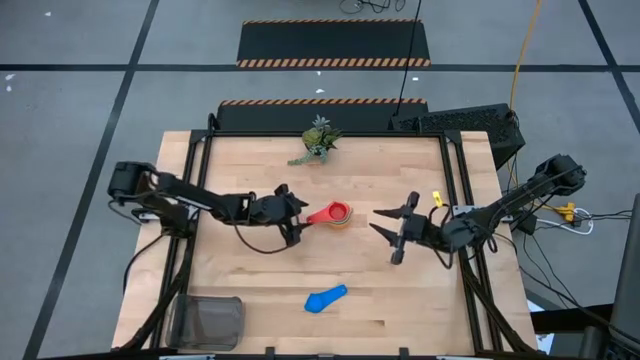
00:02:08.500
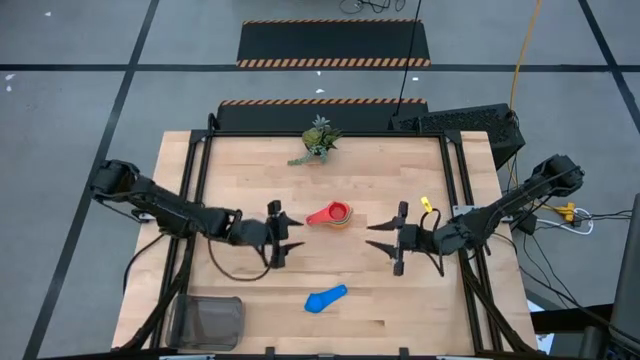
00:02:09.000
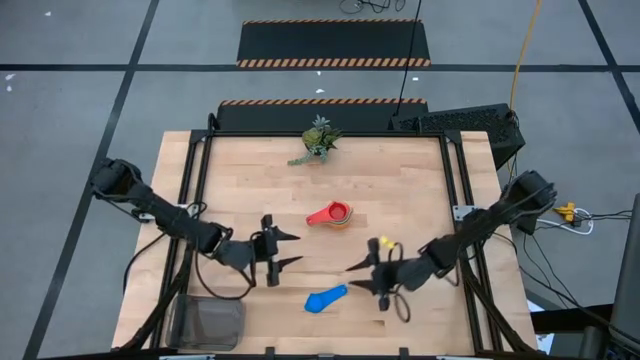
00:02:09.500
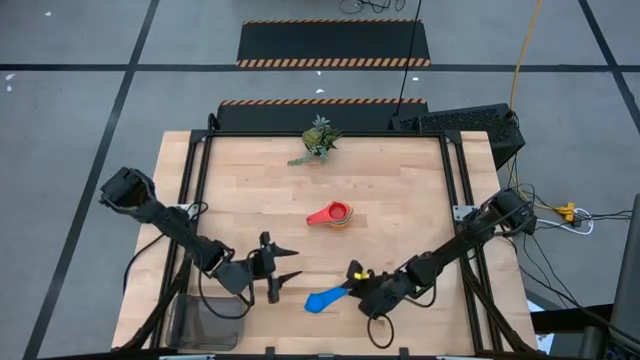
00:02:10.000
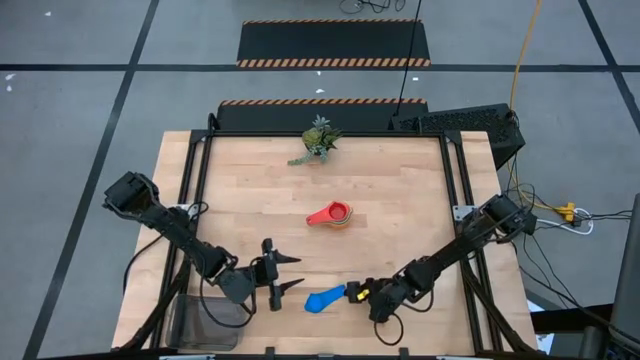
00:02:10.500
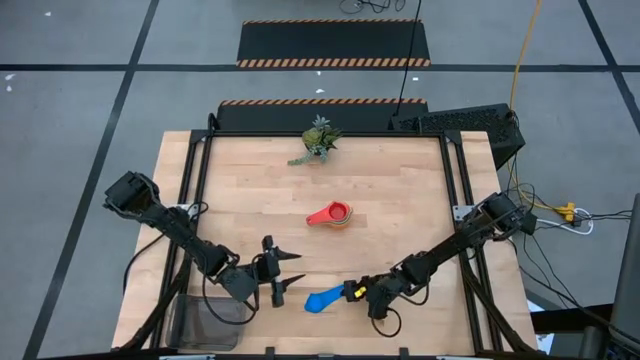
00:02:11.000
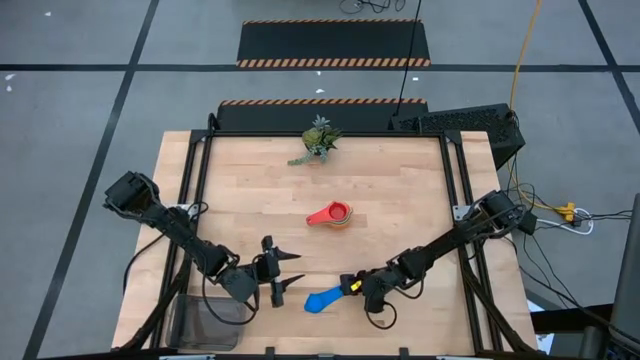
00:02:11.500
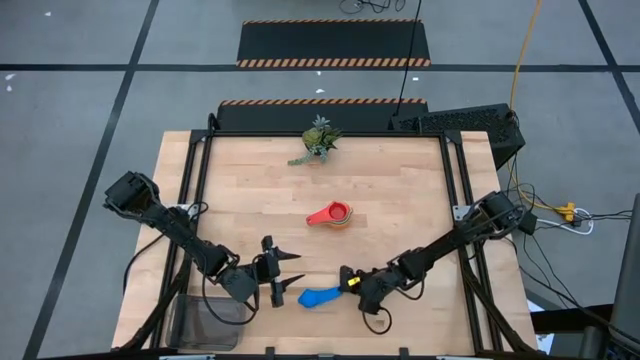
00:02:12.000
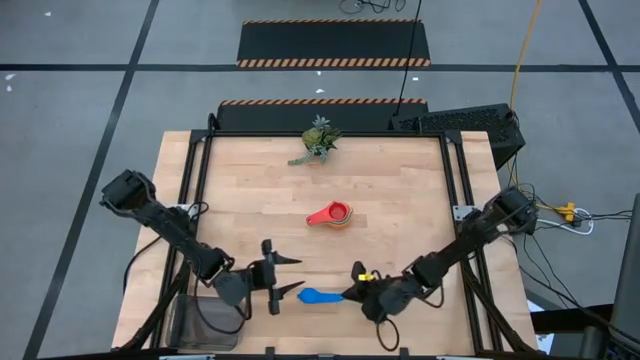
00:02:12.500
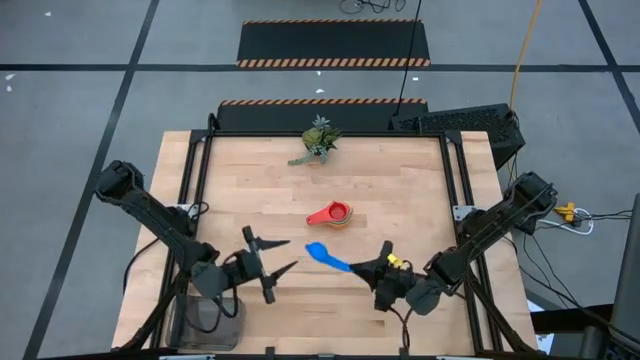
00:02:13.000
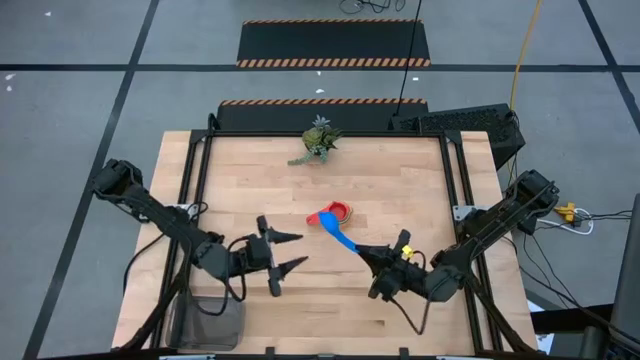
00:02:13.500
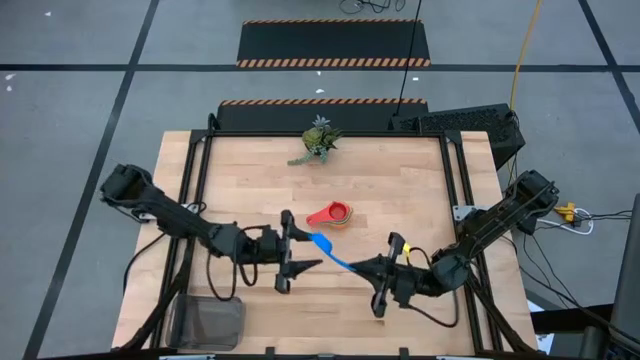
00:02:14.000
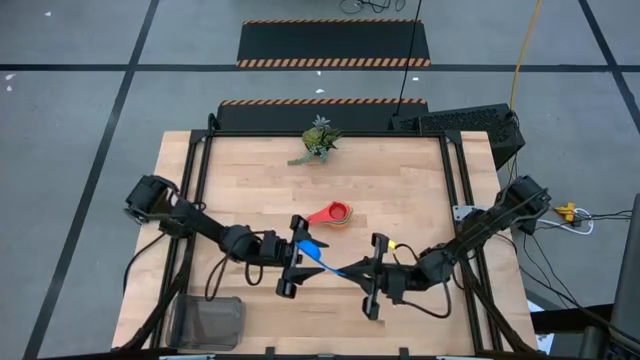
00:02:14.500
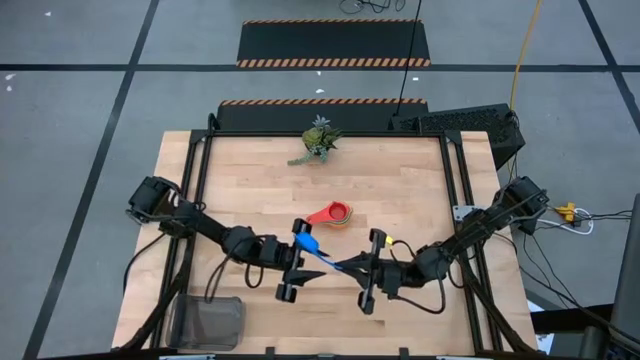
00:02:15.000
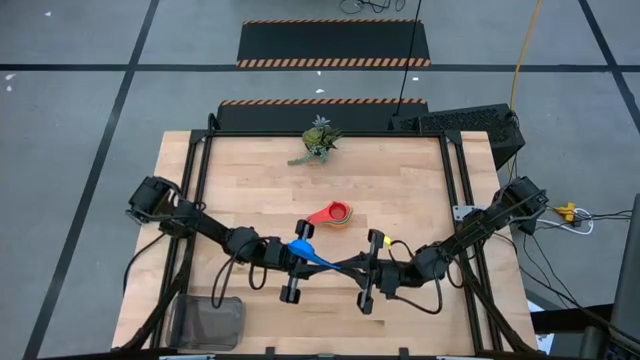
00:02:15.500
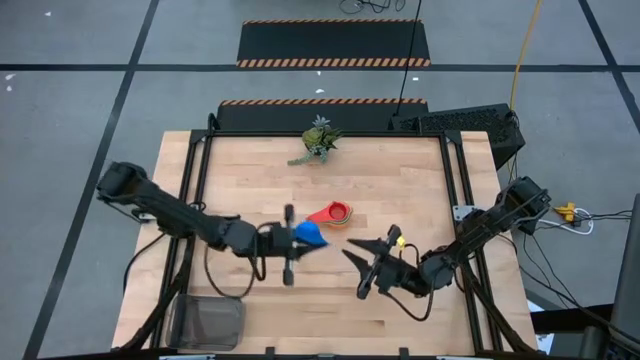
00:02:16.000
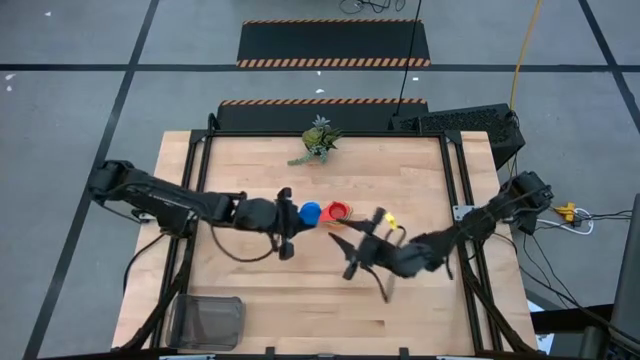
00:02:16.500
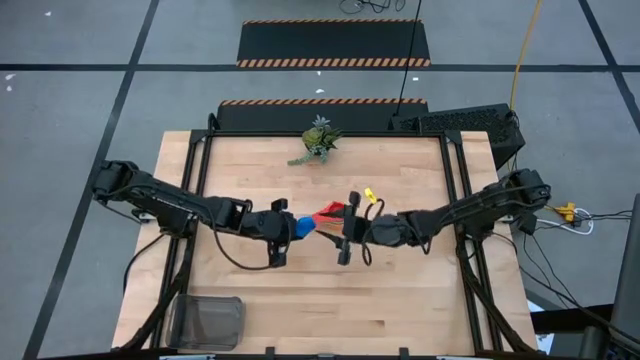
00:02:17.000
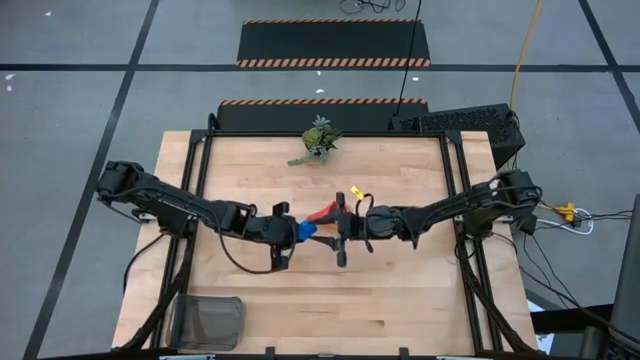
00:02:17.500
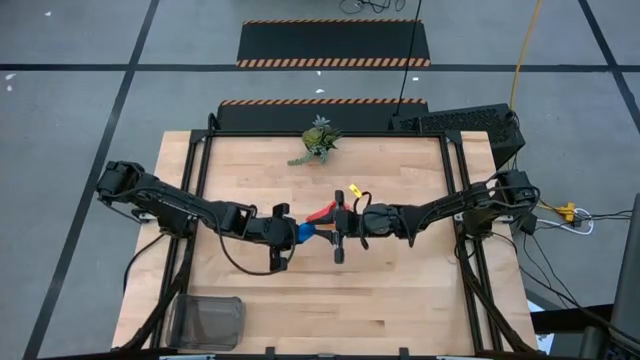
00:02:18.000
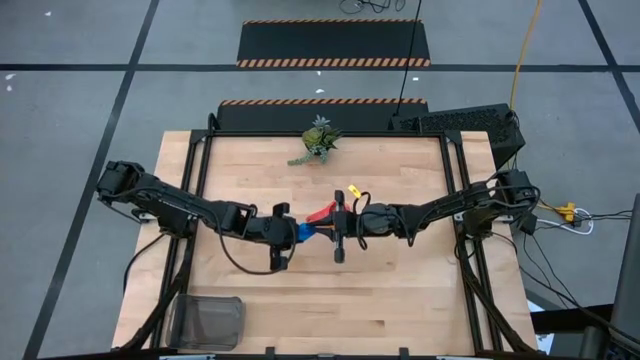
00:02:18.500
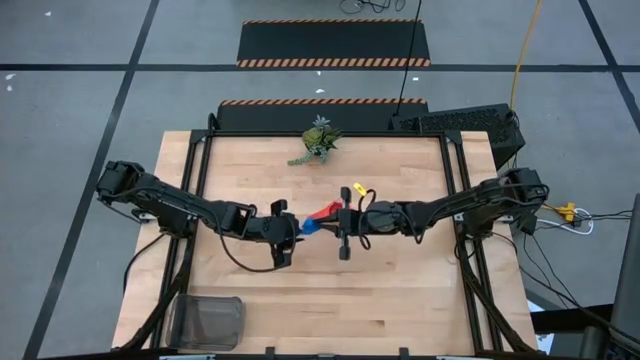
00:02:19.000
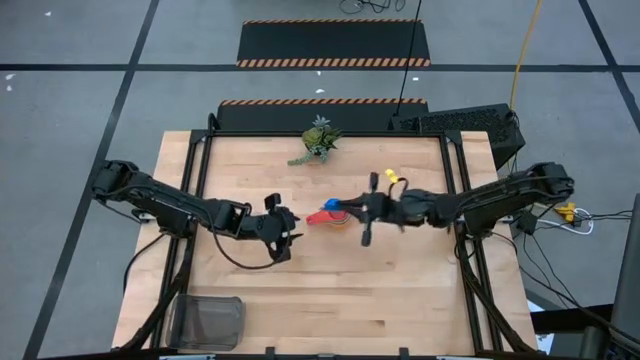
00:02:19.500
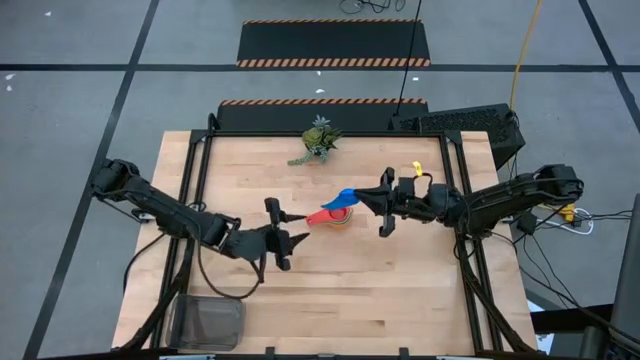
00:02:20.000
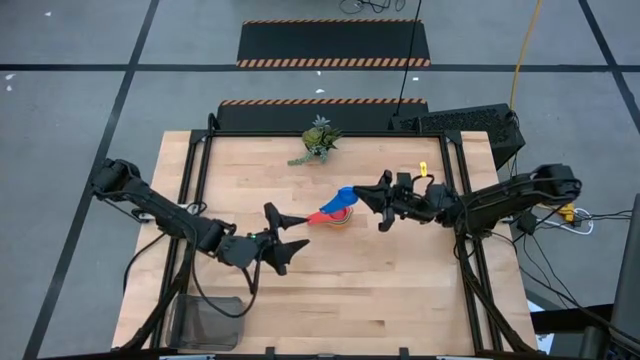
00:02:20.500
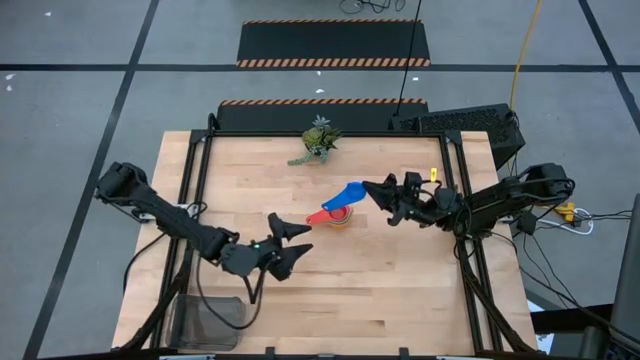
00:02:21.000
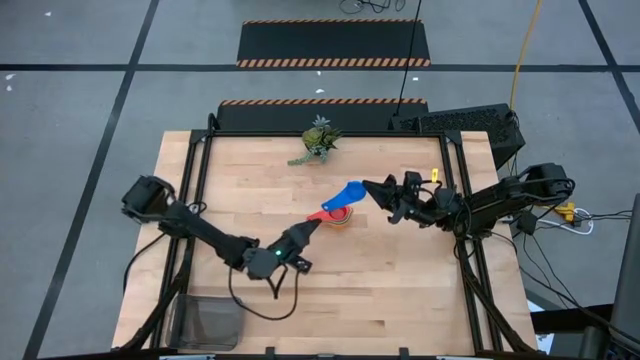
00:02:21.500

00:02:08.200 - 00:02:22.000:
Task: Nest measuring cups in basket
Stack the blue measuring cup on top of the red measuring cup

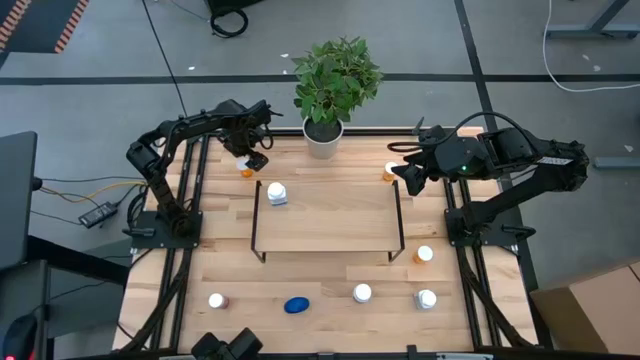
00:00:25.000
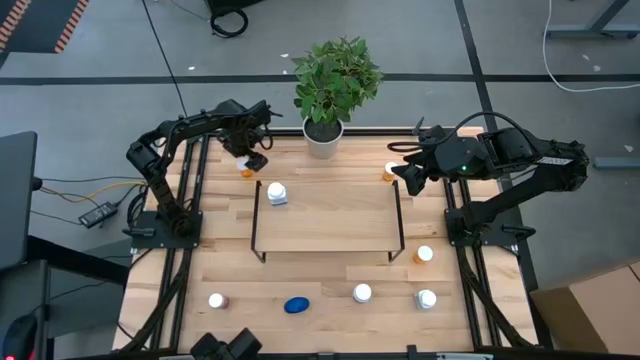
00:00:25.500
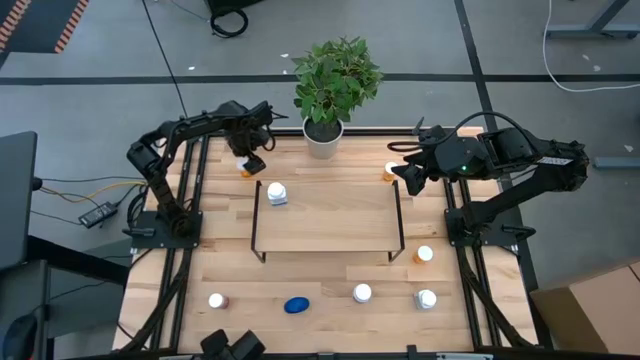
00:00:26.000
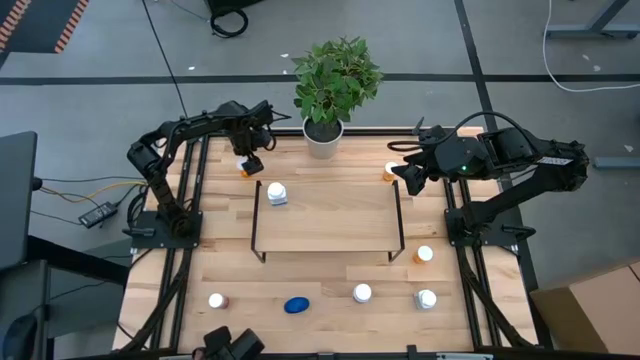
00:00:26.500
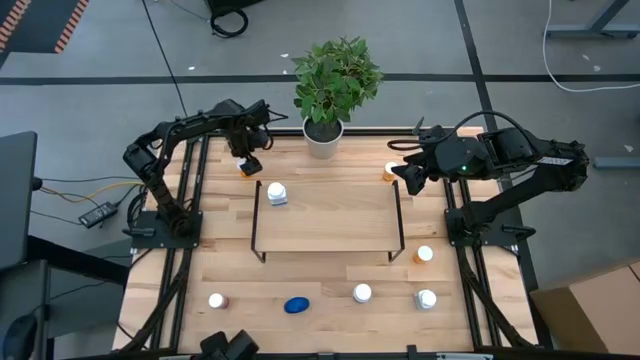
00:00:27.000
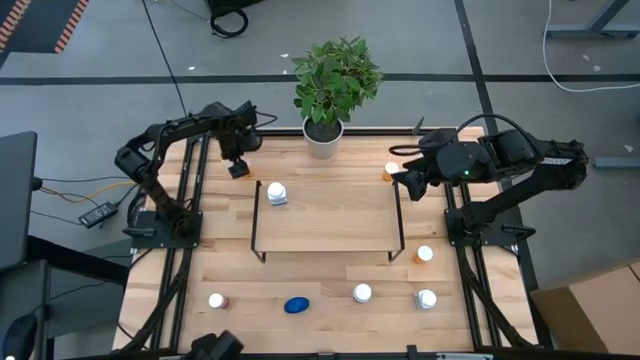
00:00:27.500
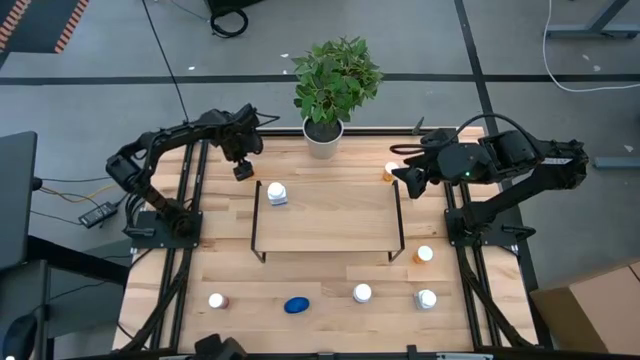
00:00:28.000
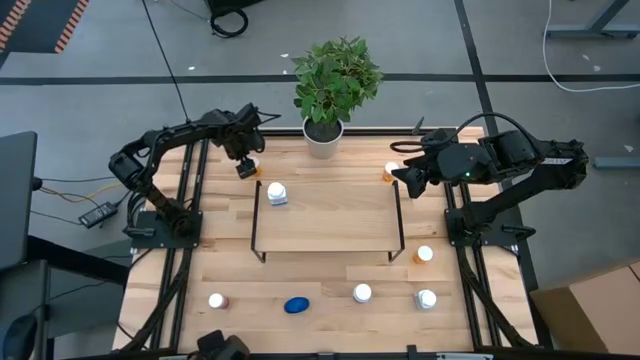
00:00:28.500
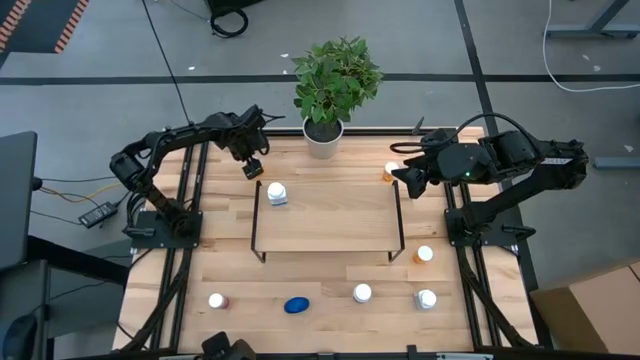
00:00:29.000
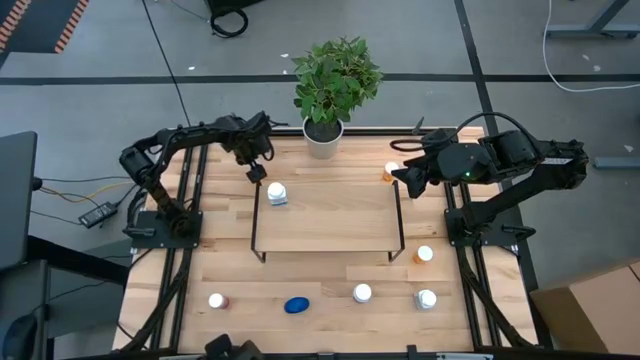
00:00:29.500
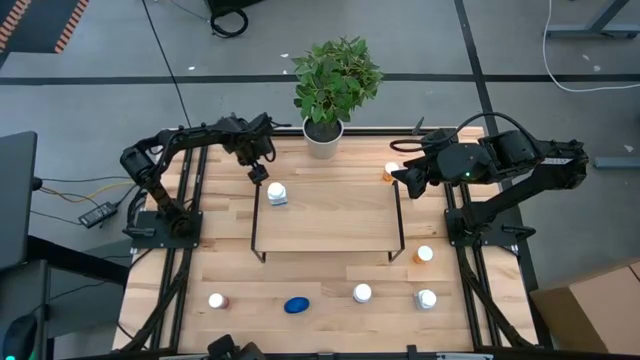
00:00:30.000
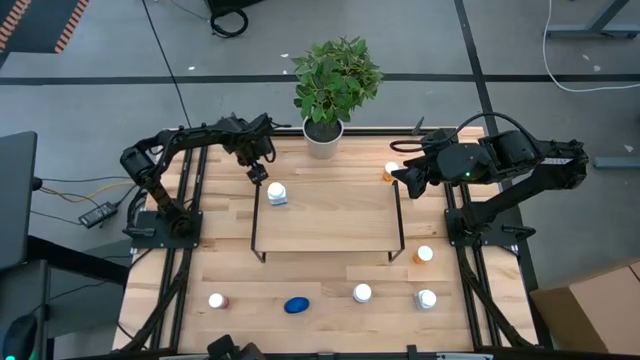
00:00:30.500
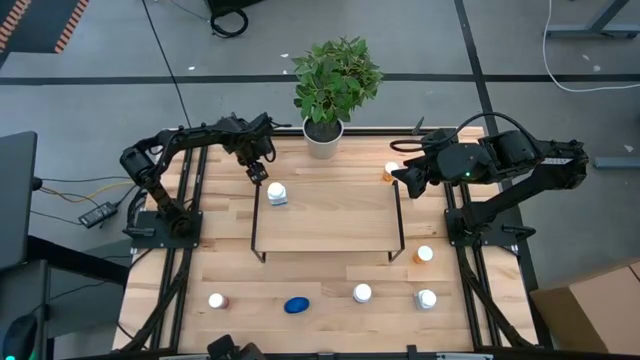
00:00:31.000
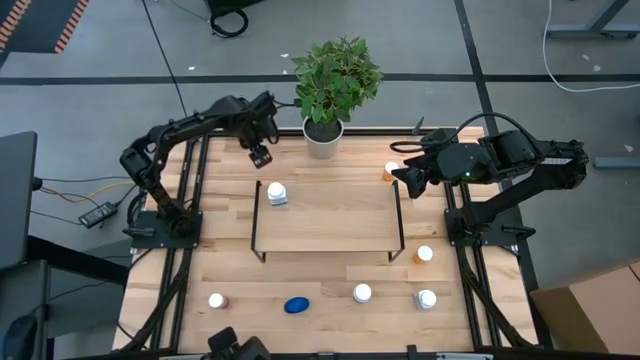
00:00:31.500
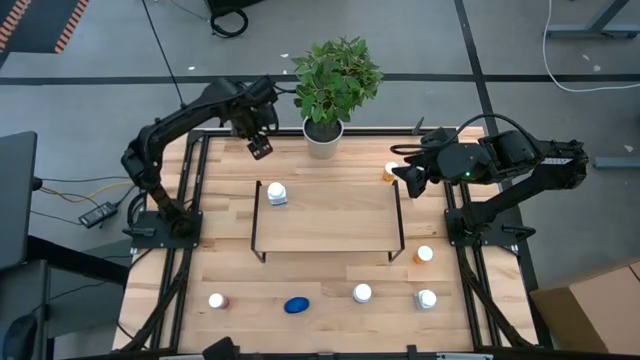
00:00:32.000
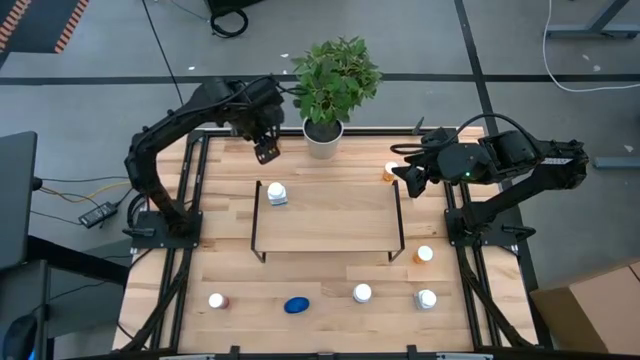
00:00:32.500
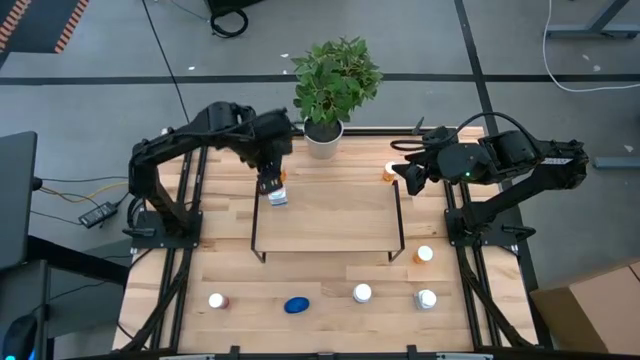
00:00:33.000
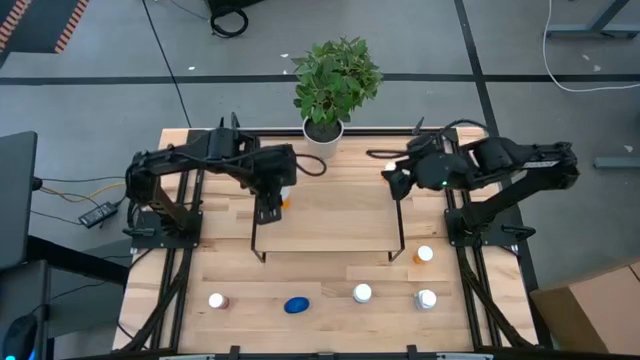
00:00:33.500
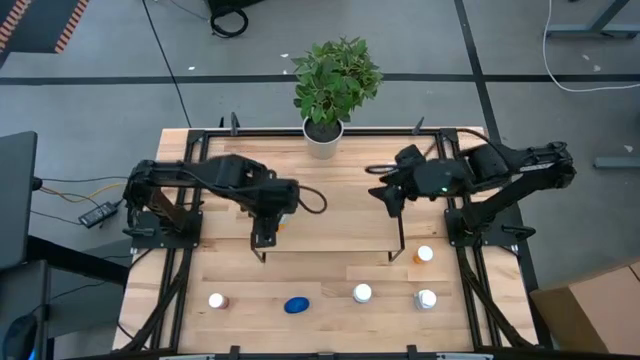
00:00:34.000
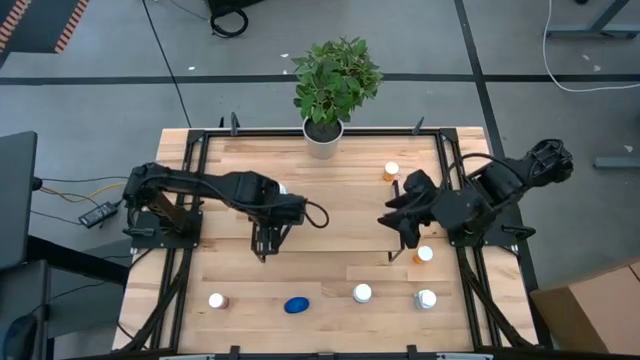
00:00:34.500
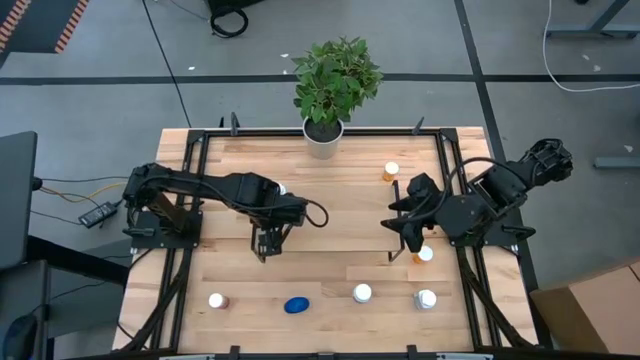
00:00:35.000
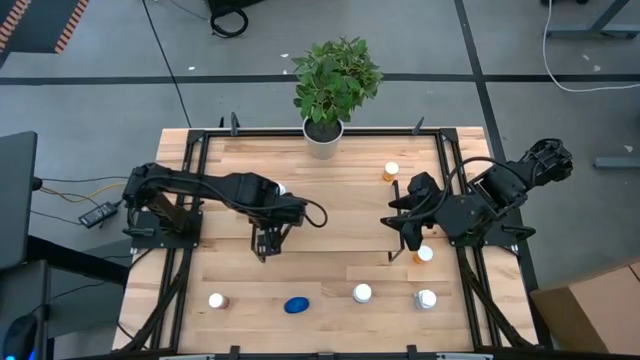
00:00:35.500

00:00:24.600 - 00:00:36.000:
Task: Pick and place medicine bottles onto shelf by color
Put the top left orange pill bottle on the shelf
